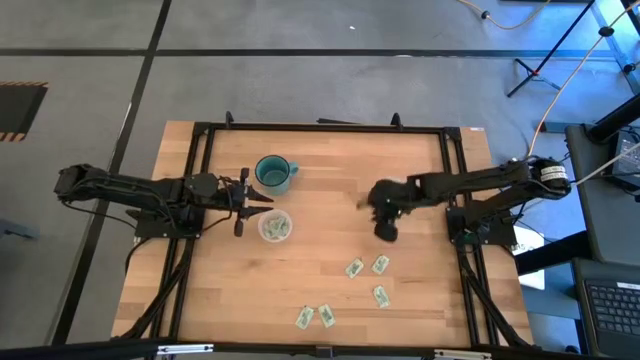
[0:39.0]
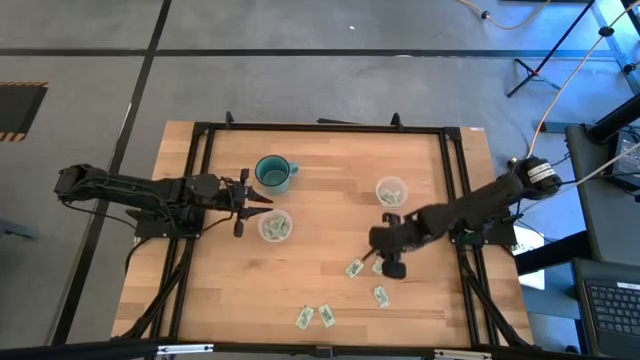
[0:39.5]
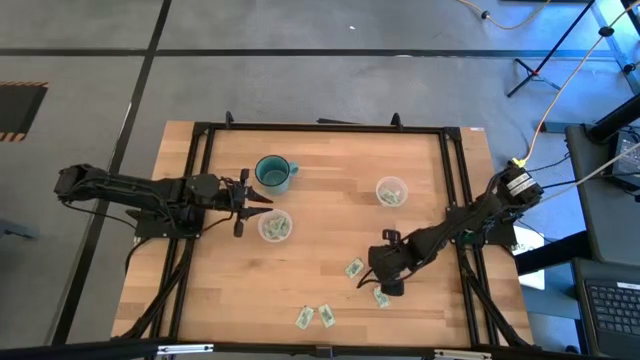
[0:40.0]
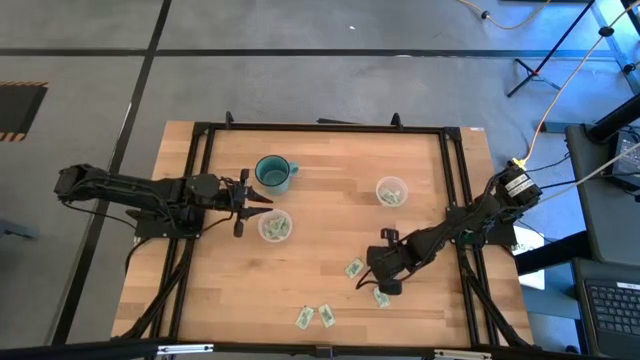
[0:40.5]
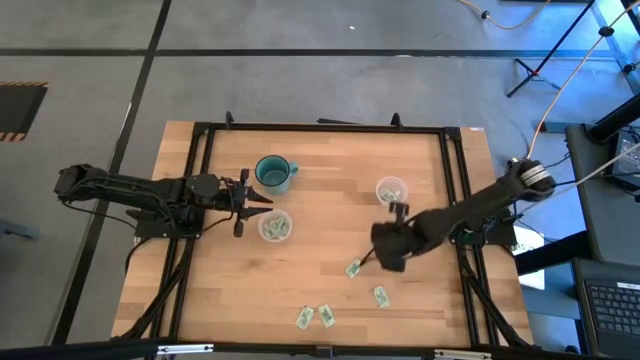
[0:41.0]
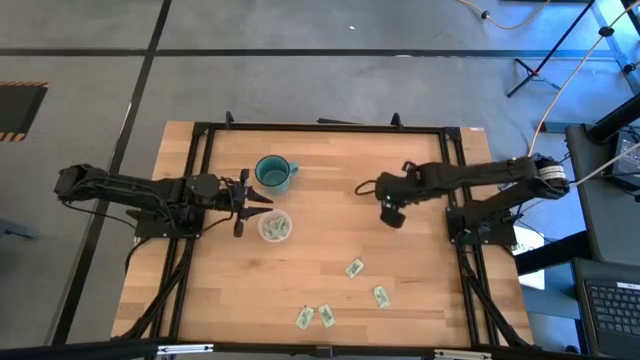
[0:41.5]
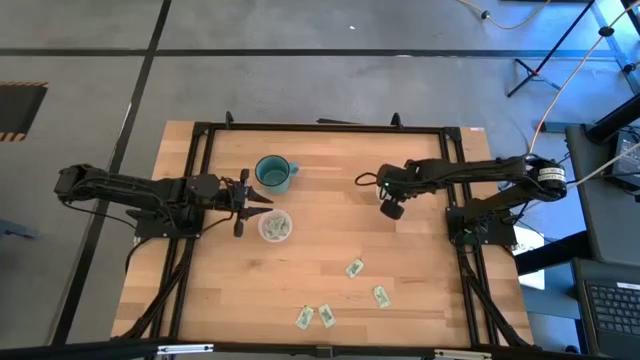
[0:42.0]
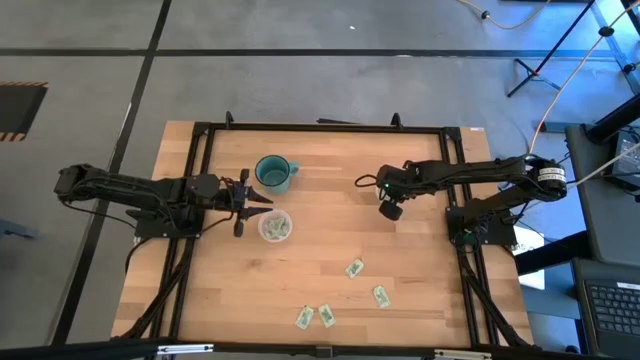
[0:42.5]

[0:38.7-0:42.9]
Task: Pick and place Stevia / Truvia into bins
Put the white stevia packet into the right transparent container

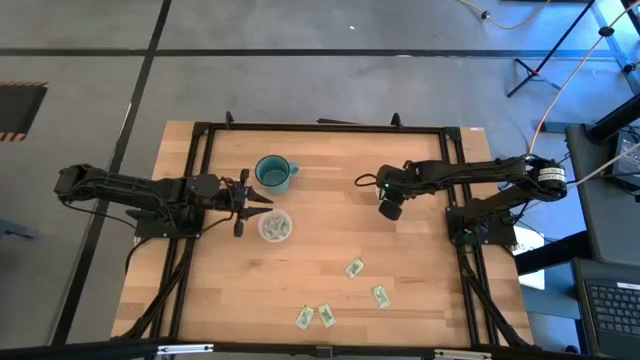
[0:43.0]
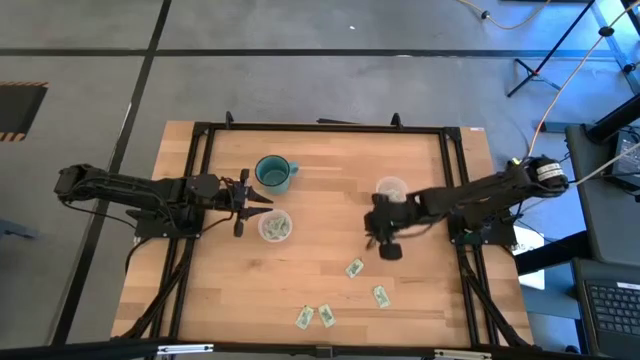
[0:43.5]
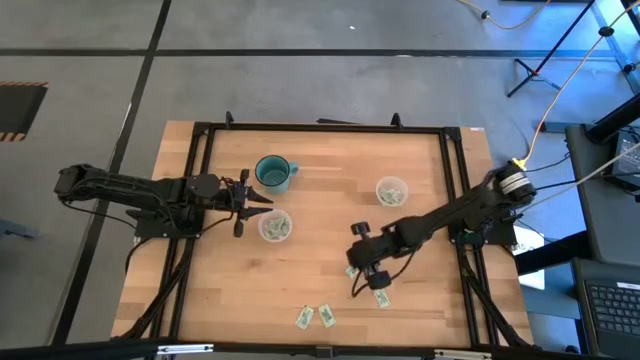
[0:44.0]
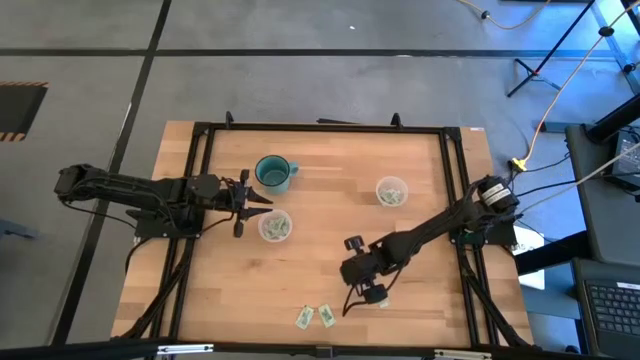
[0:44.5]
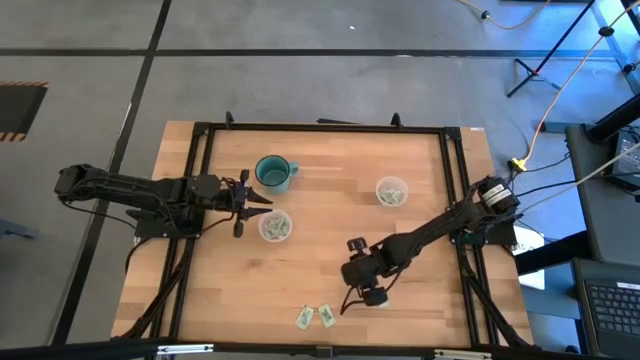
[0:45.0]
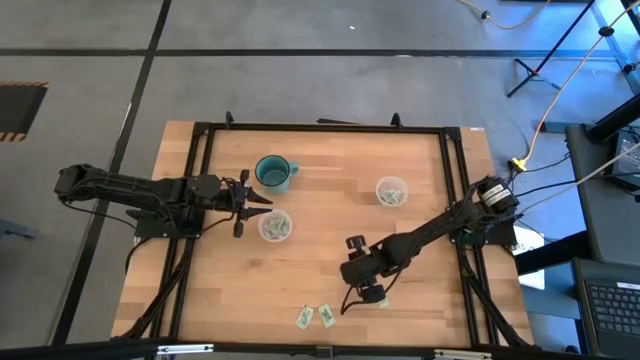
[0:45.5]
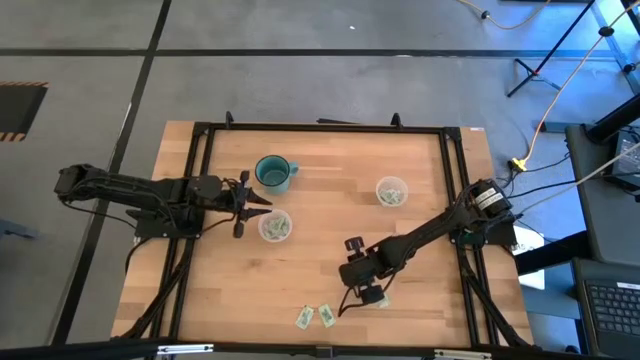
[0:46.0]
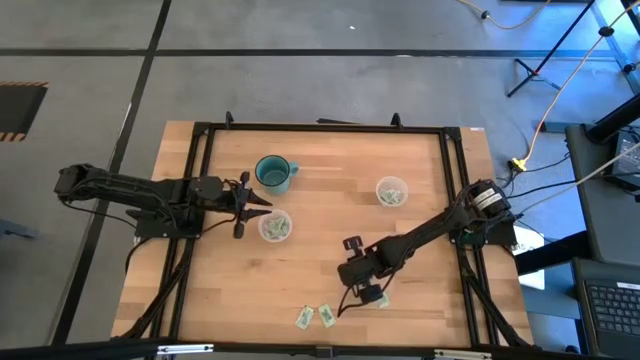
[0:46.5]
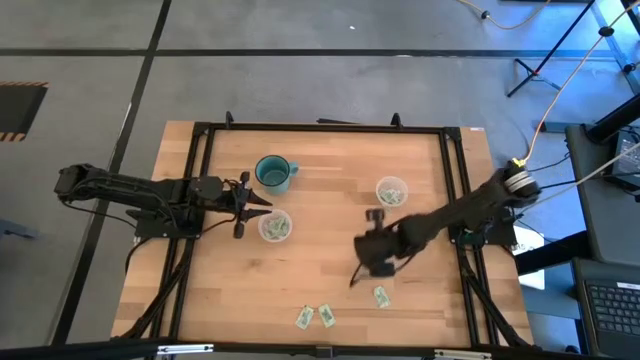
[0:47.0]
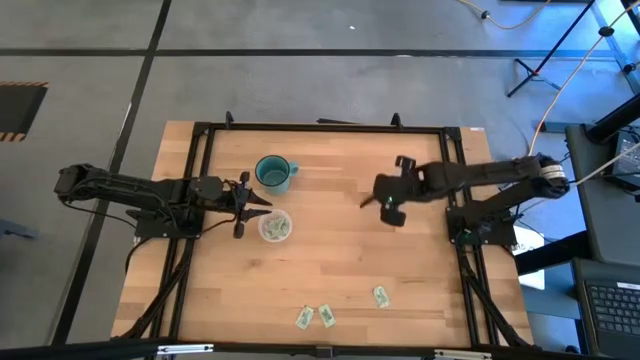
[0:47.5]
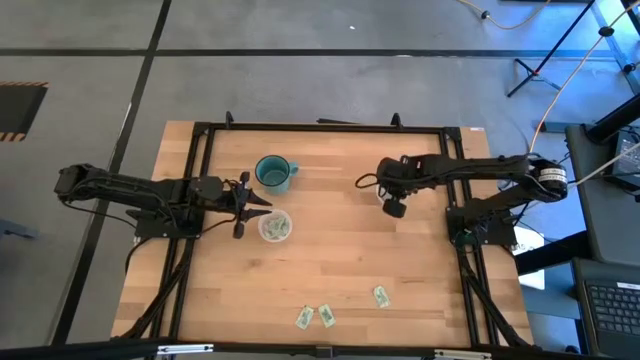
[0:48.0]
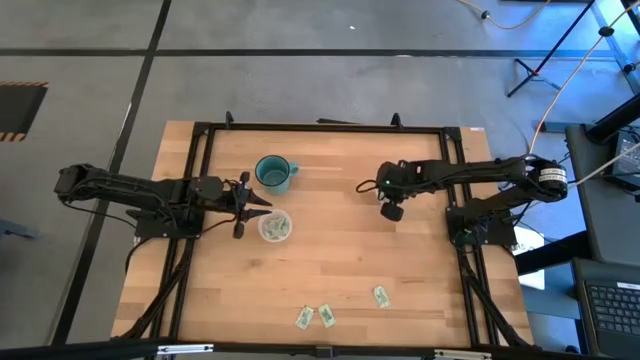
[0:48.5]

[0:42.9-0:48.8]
Put the white stevia packet into the right transparent container

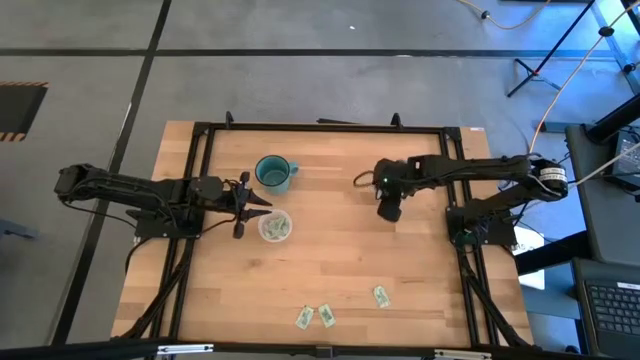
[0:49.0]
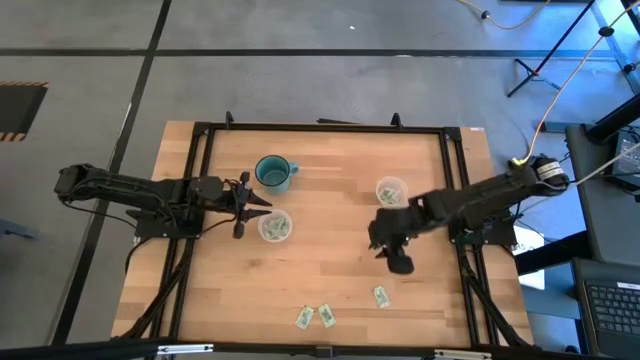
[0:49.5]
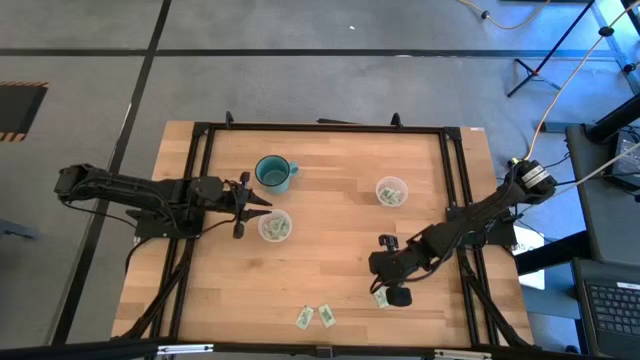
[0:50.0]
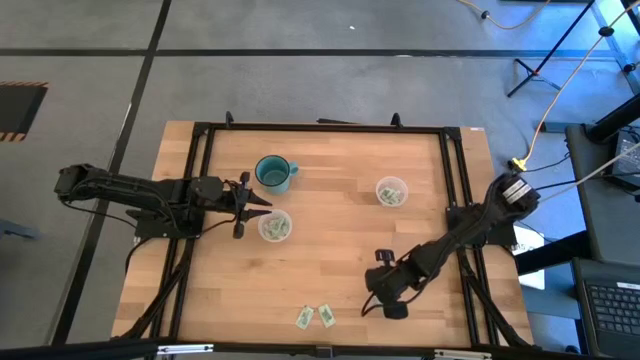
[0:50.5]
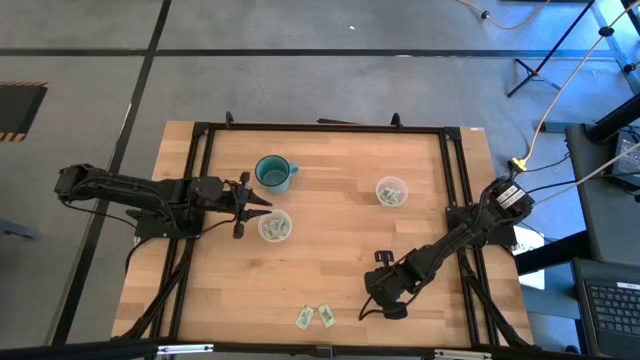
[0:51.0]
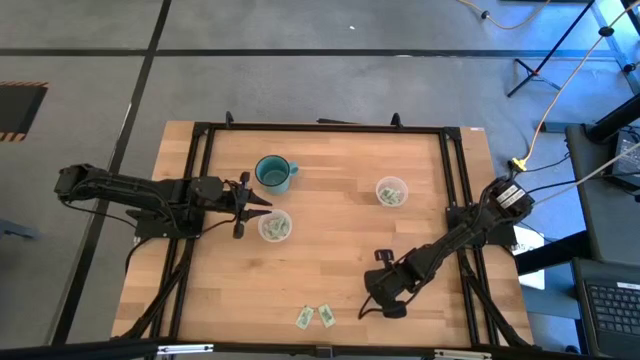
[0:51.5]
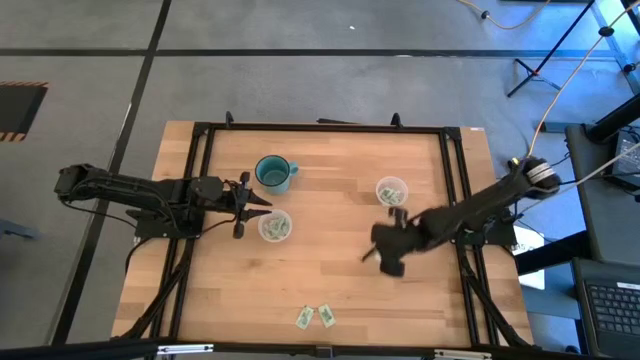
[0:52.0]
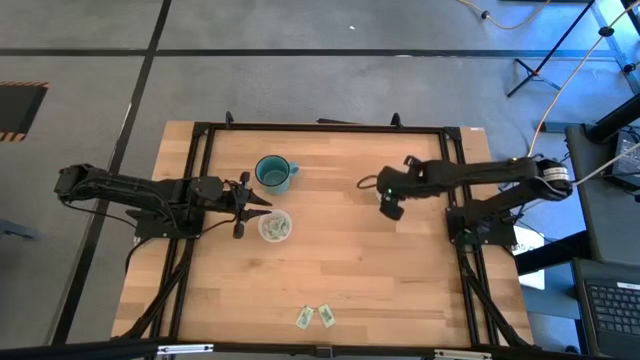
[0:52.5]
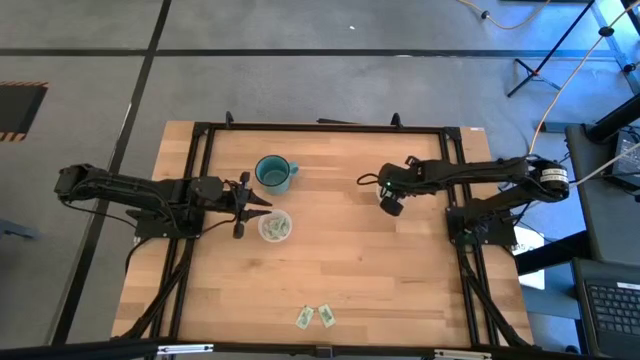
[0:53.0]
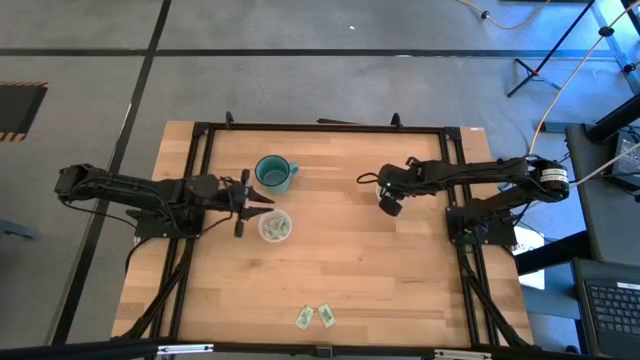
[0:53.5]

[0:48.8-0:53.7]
Put the white stevia packet into the right transparent container

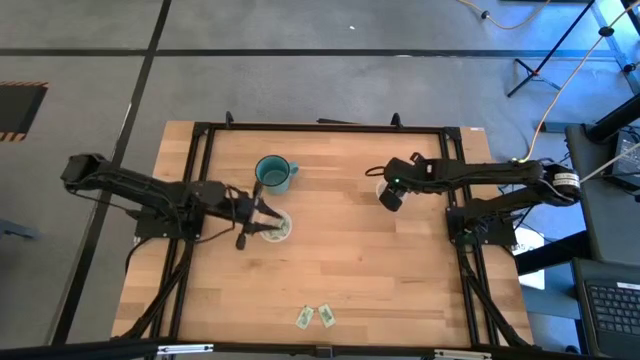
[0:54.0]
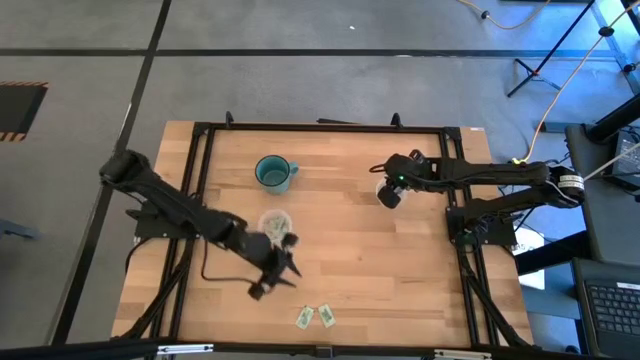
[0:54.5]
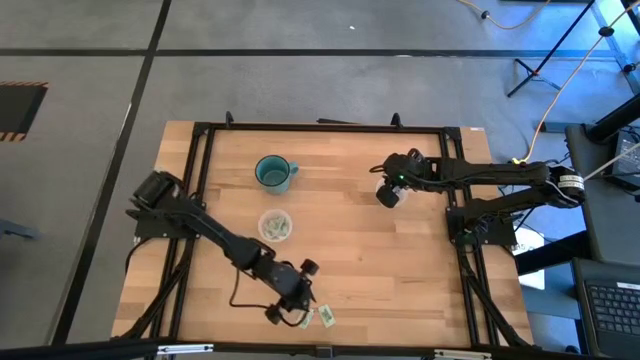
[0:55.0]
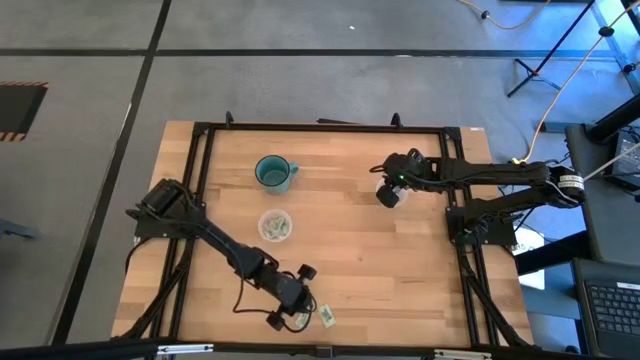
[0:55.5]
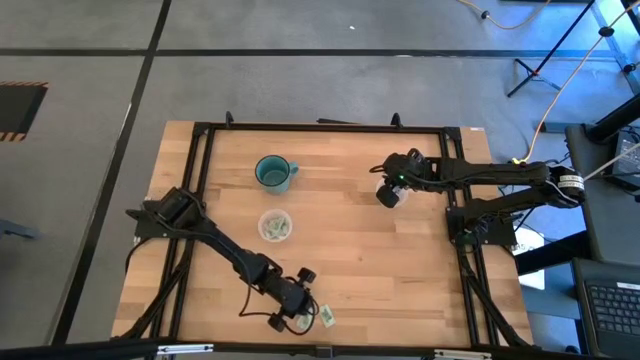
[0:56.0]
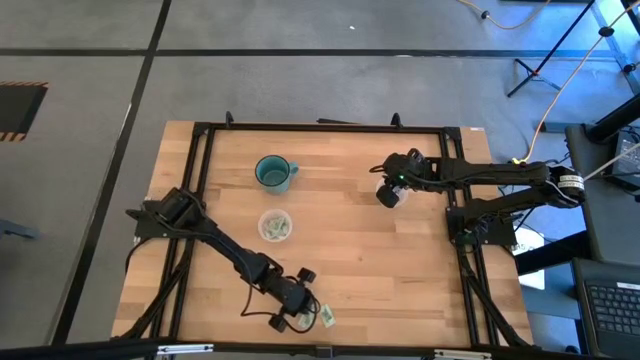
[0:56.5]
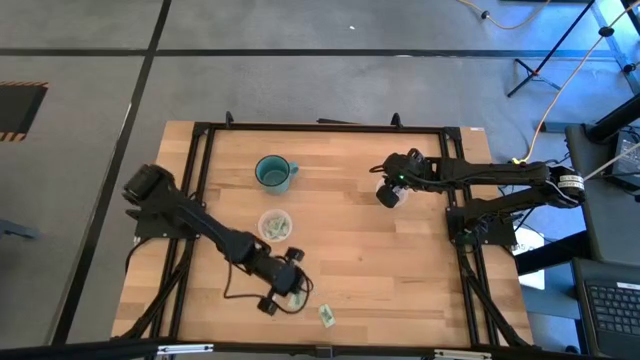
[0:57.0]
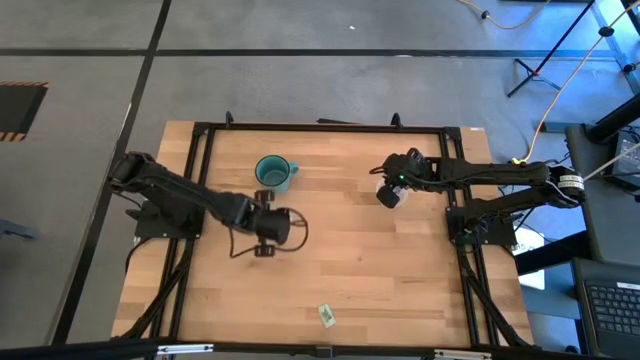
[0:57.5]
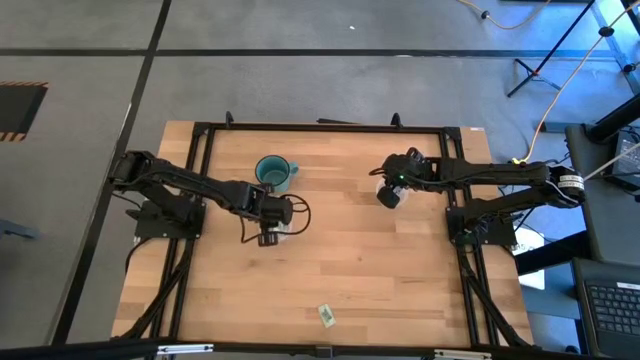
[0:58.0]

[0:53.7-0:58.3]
Put the white stevia packet into the left transparent container

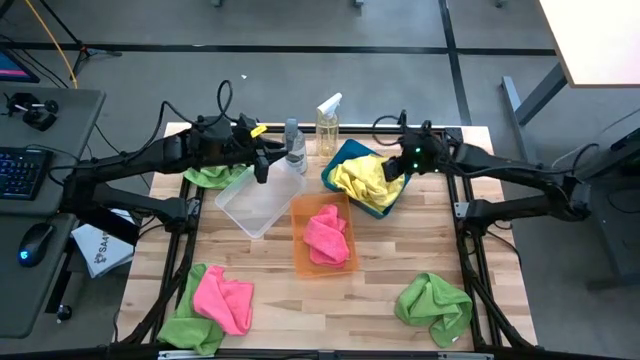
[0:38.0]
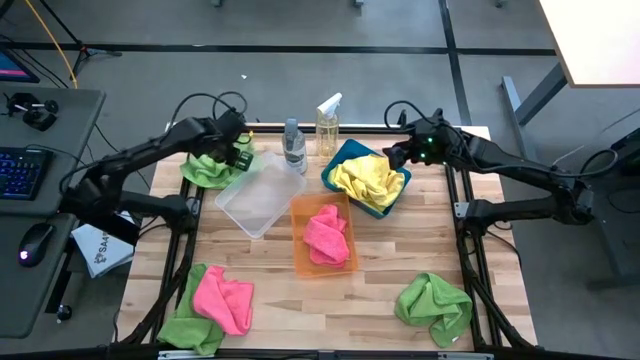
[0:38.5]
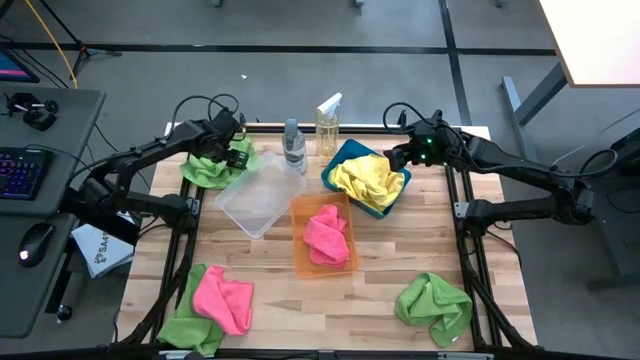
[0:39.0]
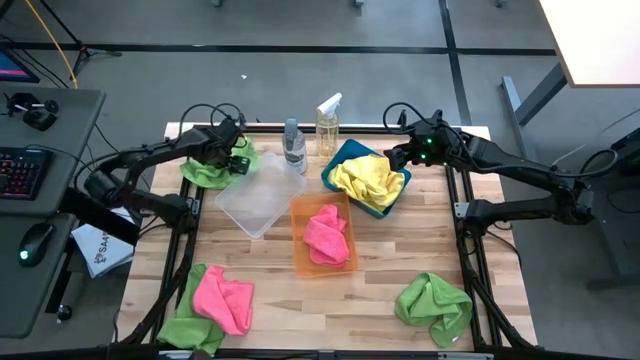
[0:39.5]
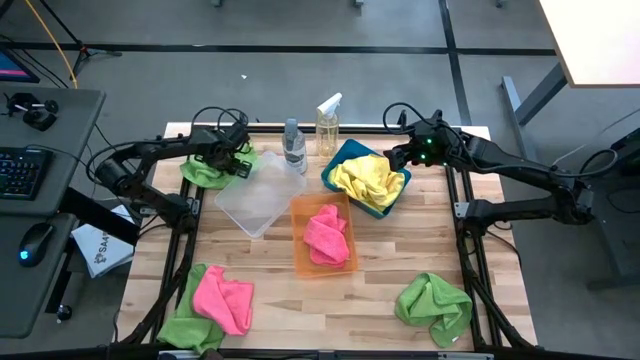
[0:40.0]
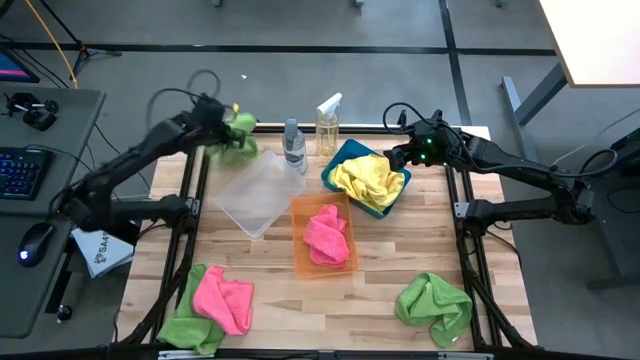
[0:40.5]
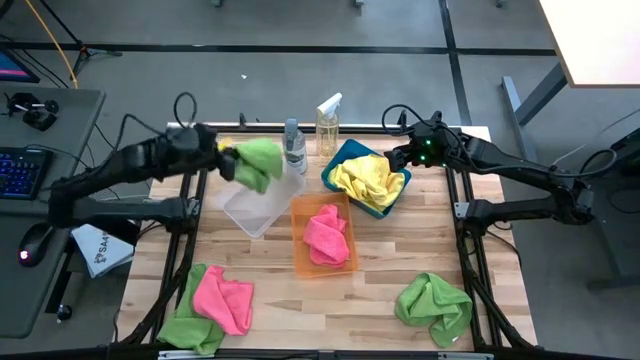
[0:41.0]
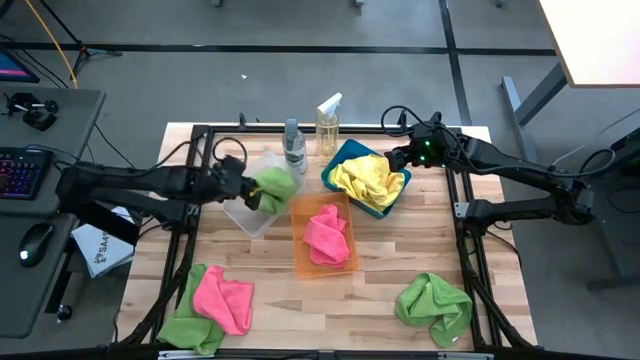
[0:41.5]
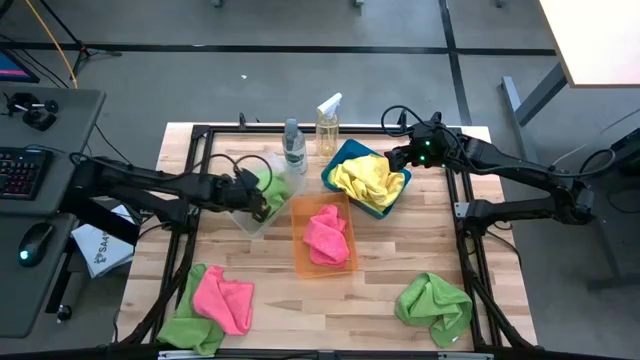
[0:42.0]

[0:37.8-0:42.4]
Task: Sort microfiber towel by color & place in baskets
Put the top left green towel into the transparent bin
